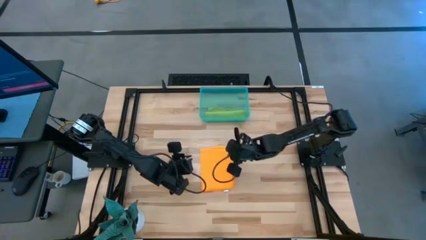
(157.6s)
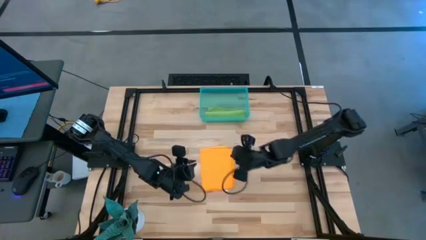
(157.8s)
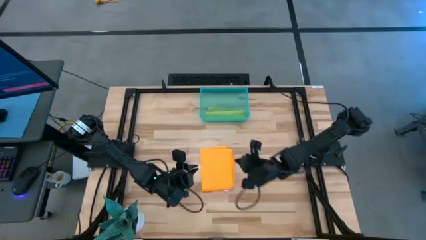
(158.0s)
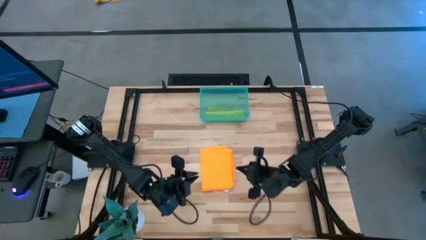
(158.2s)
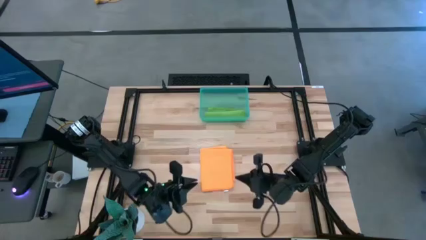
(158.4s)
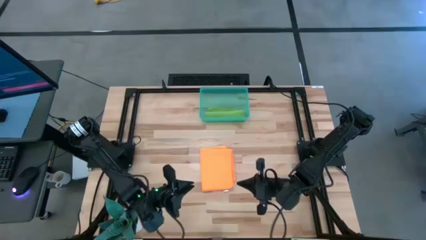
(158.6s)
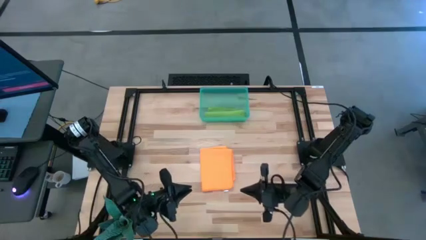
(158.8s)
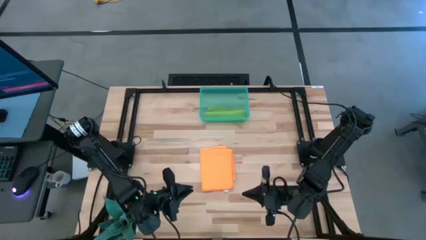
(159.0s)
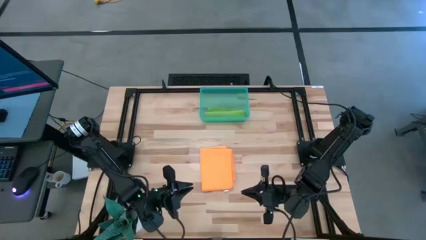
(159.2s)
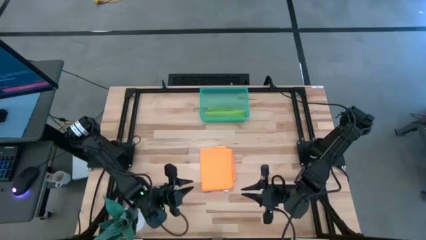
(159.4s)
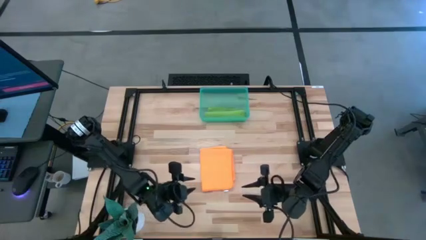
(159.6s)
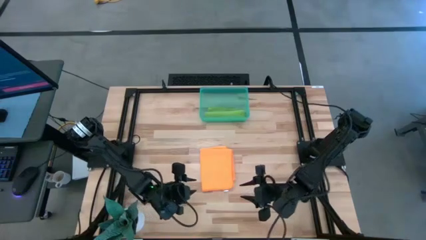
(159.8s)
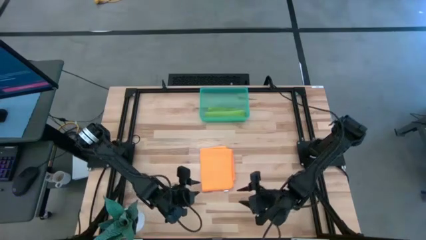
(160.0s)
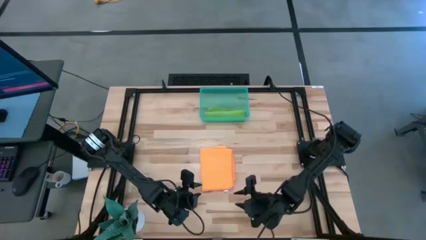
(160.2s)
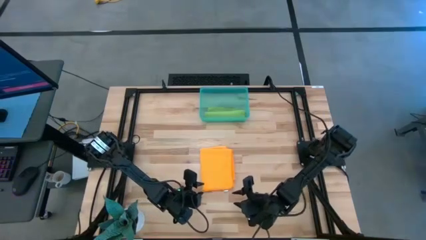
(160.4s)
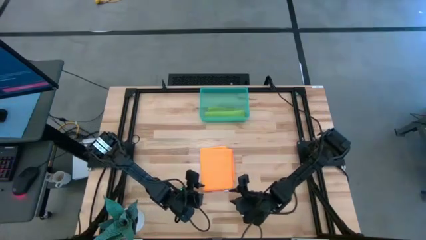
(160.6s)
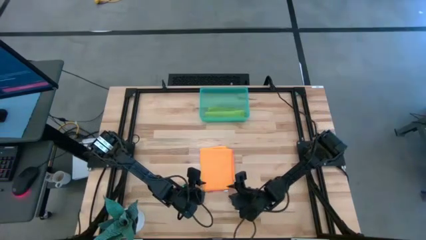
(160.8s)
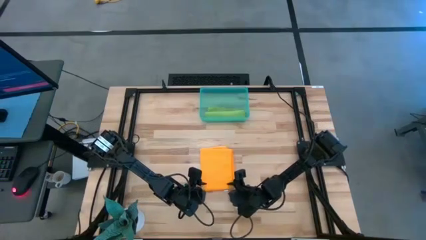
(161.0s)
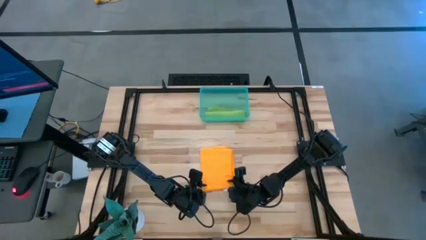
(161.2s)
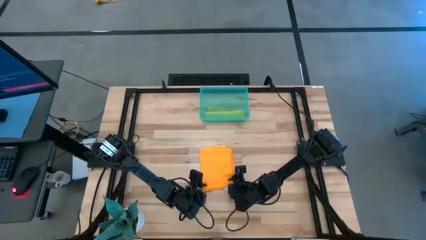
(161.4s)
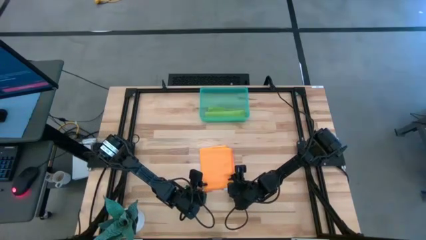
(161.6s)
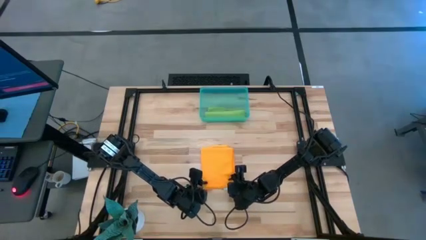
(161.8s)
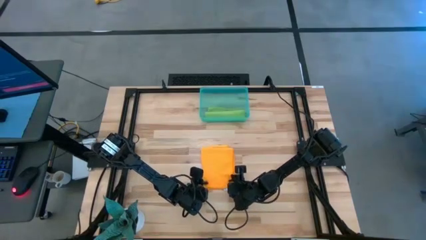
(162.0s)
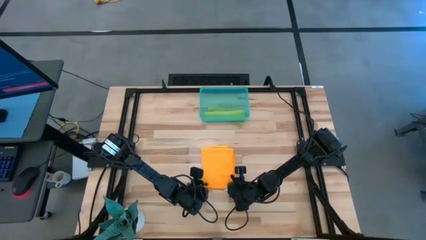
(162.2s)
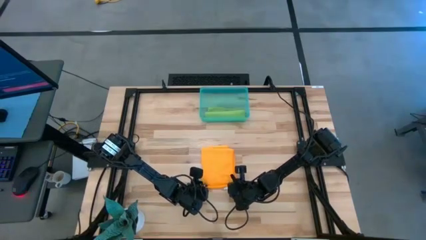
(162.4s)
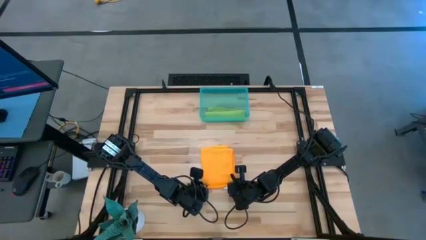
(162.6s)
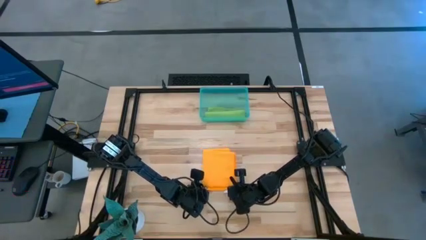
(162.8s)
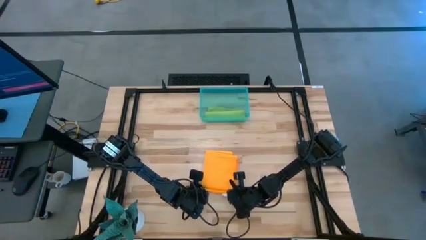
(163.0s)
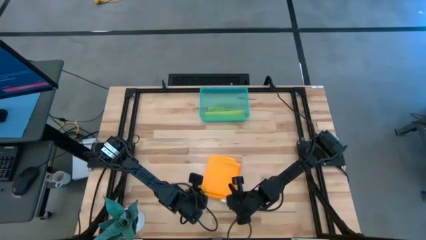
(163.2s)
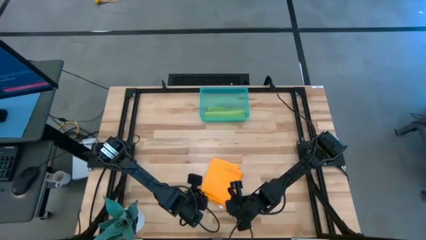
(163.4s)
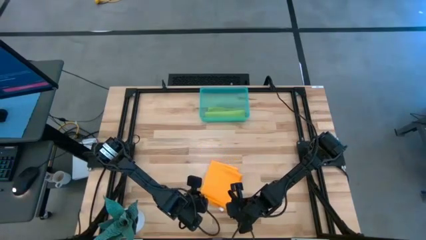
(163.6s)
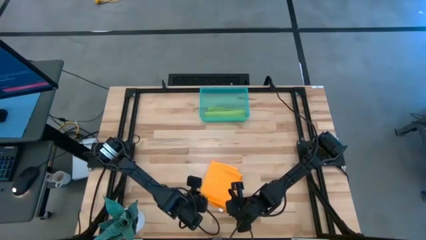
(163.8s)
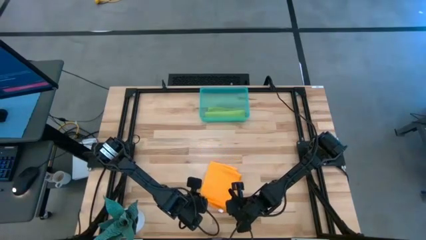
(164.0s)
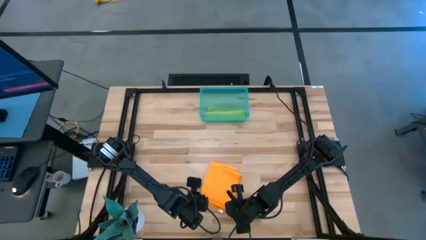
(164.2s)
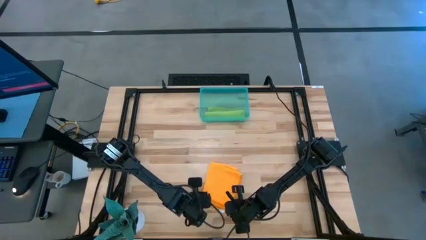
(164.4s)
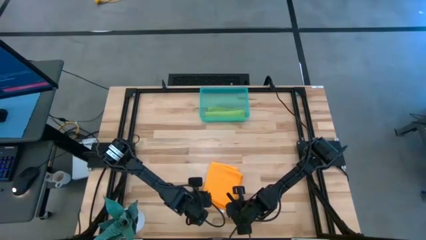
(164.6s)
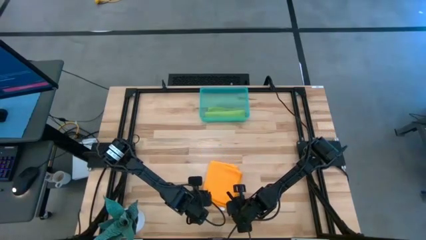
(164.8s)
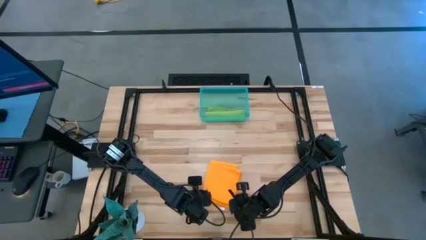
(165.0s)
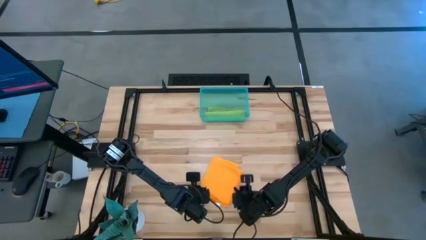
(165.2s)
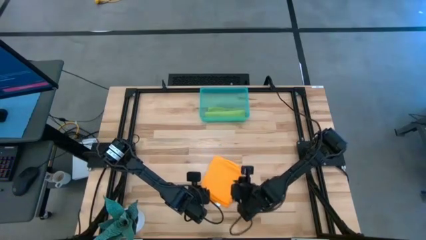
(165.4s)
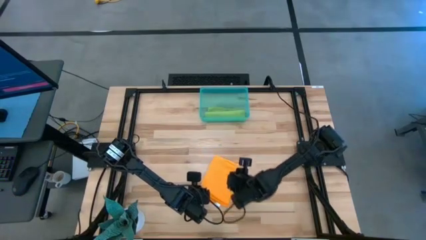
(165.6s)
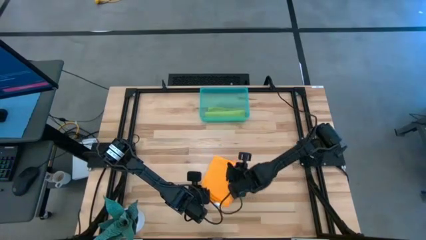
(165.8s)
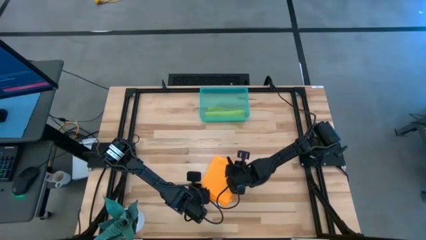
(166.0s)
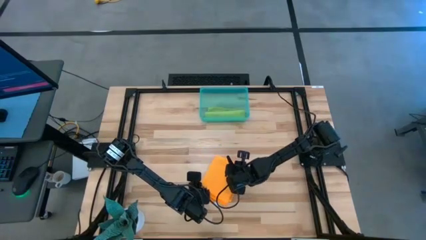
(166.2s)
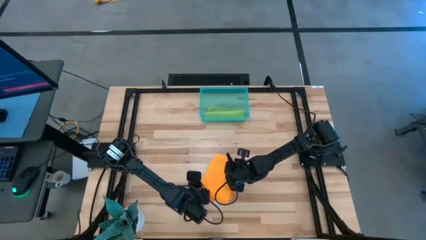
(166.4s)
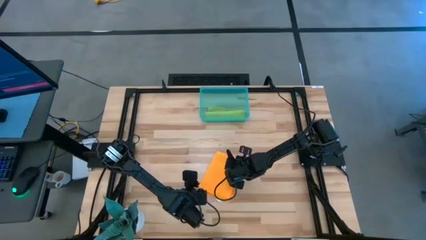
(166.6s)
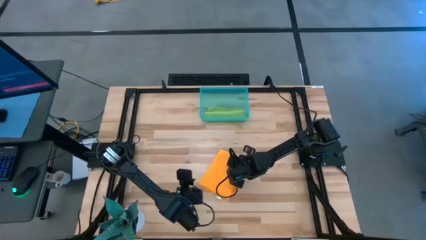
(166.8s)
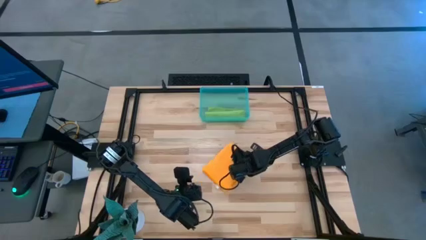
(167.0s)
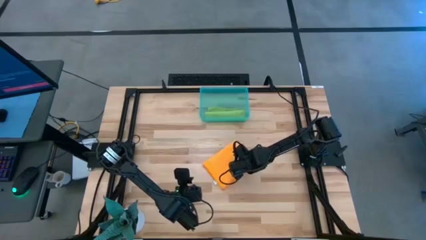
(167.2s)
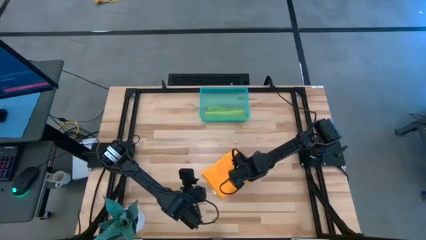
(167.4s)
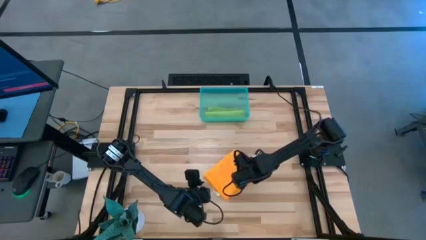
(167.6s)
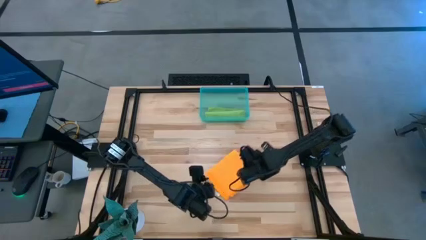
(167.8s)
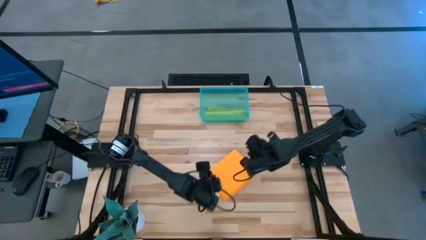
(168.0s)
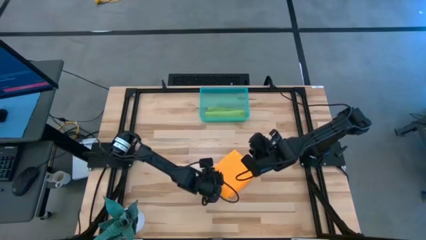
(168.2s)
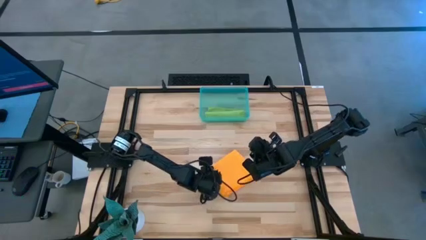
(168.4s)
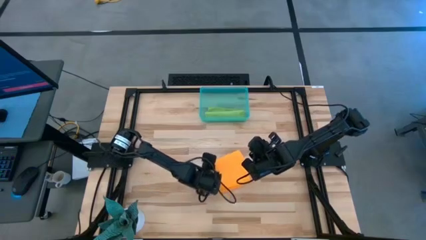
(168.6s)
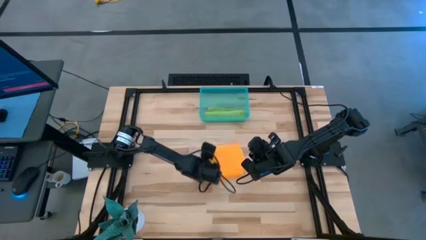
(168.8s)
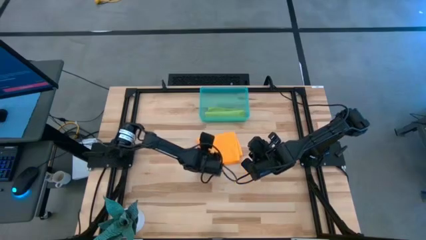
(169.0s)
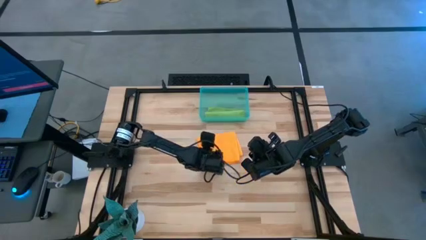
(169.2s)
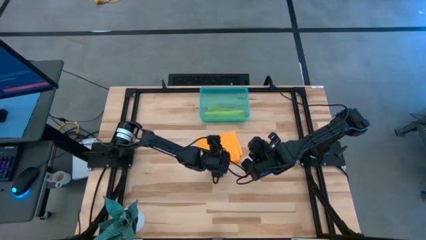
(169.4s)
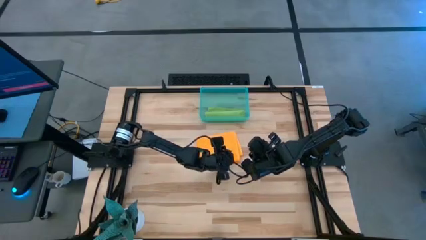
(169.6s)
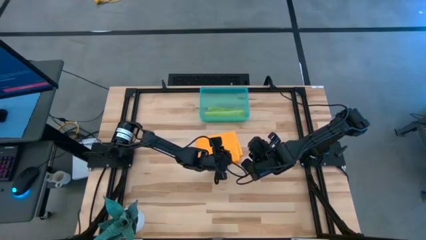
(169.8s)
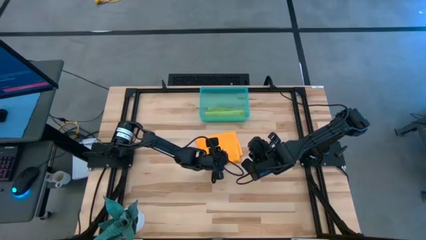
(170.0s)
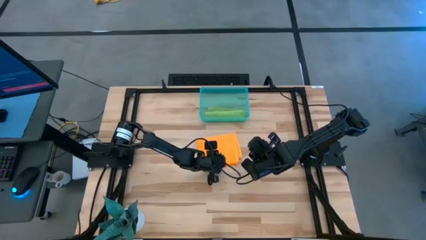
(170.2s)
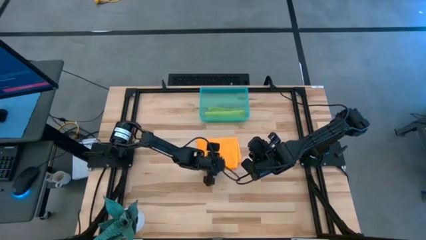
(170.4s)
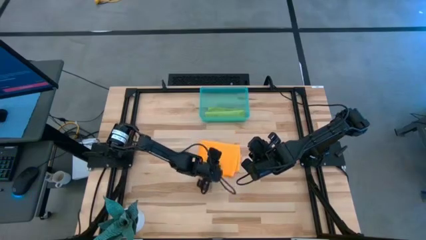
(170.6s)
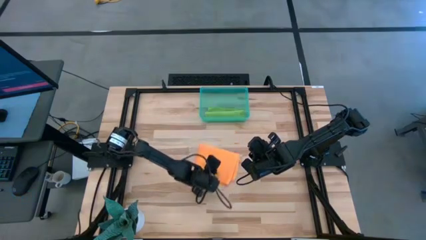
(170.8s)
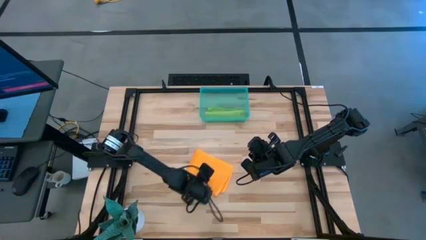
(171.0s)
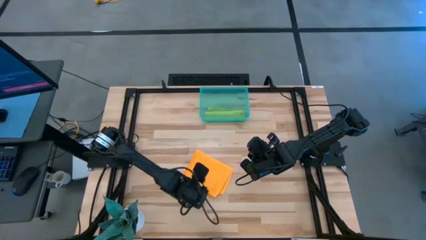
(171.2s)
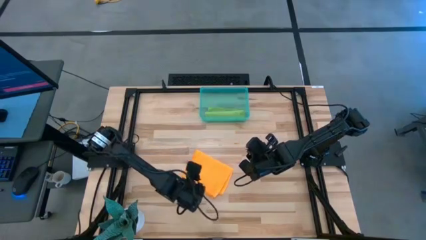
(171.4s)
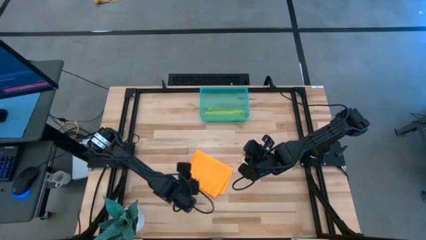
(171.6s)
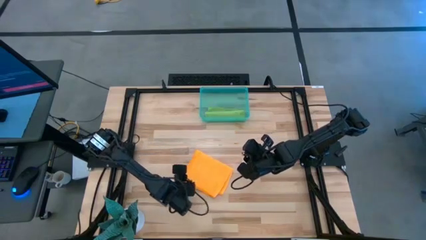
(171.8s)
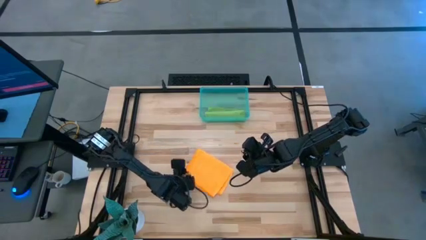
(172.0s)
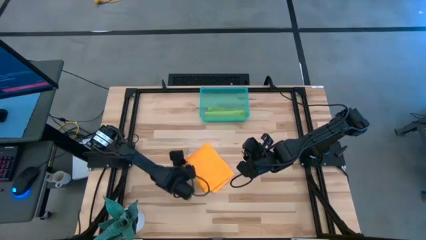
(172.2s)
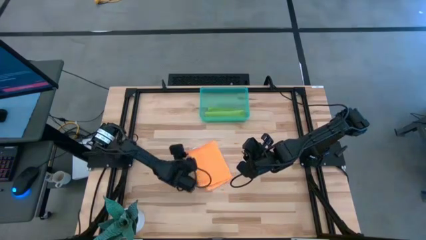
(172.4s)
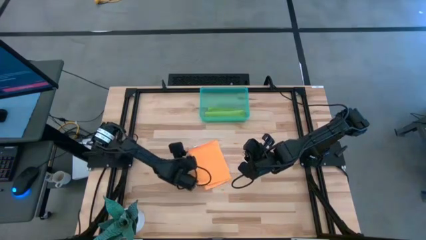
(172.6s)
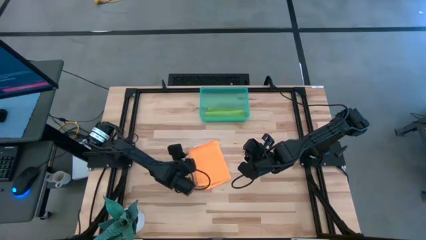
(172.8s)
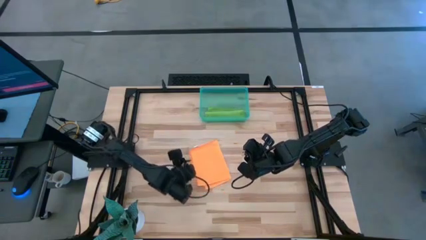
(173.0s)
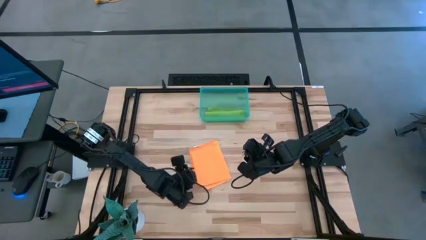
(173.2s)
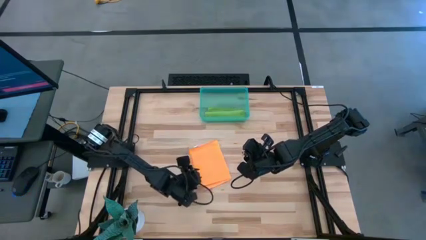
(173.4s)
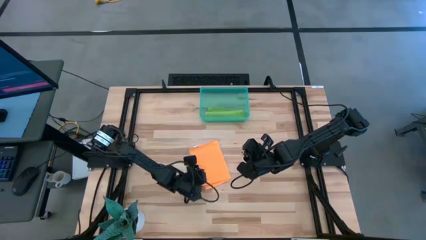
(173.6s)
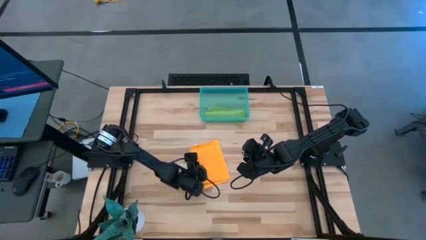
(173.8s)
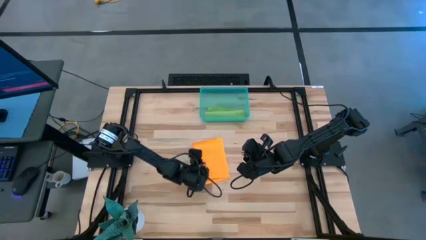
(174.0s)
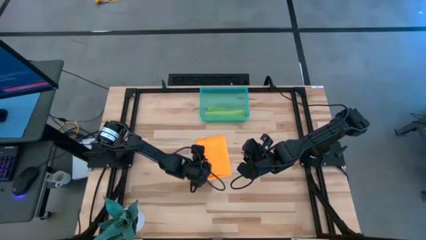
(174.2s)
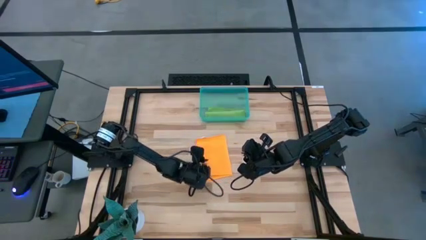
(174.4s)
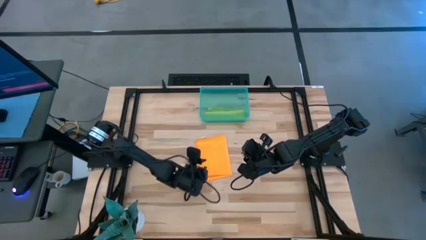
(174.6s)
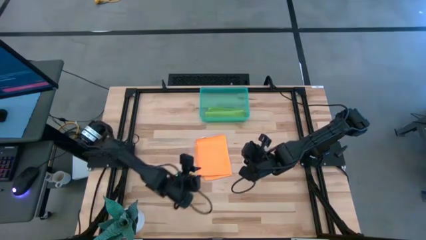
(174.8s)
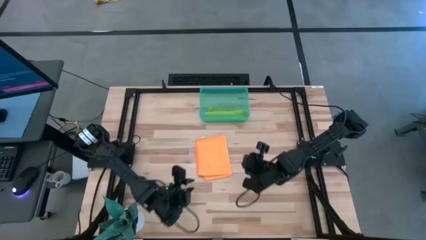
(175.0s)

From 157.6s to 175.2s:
Task: Roll microfiber towels into tight, uniform cylinder then place into a basket
Roll the yellow microfiber towel
